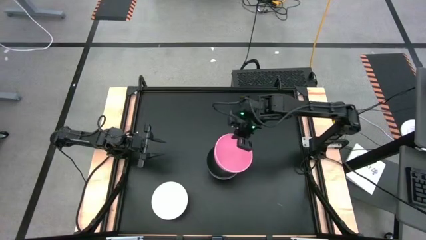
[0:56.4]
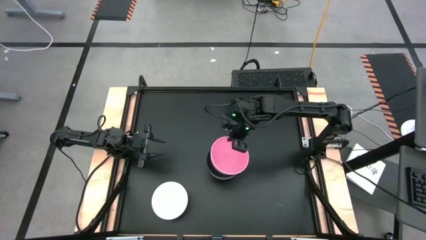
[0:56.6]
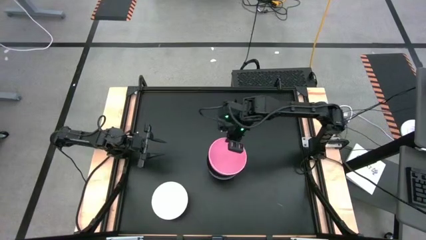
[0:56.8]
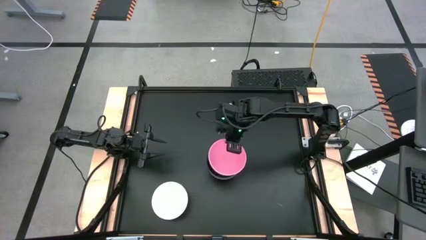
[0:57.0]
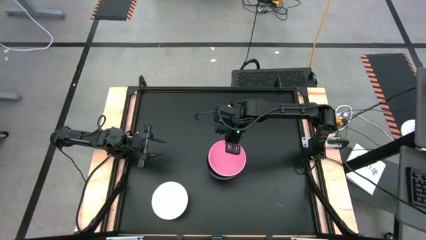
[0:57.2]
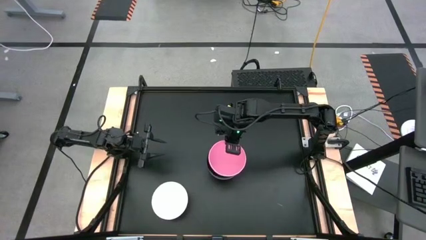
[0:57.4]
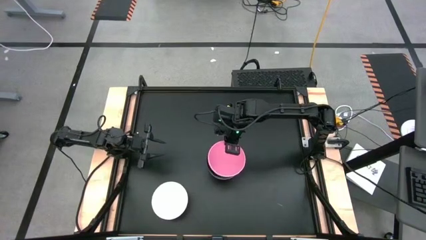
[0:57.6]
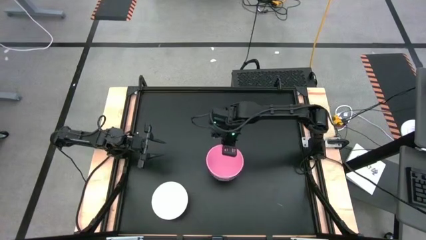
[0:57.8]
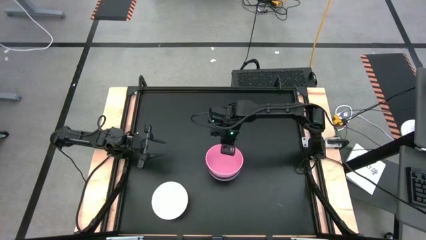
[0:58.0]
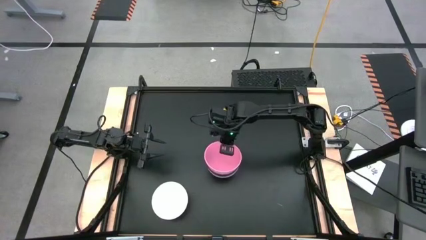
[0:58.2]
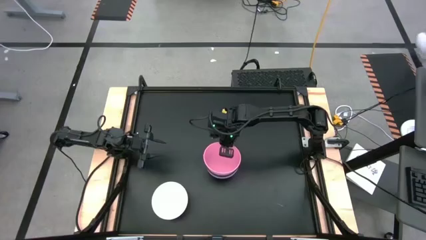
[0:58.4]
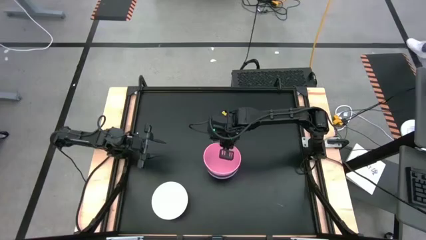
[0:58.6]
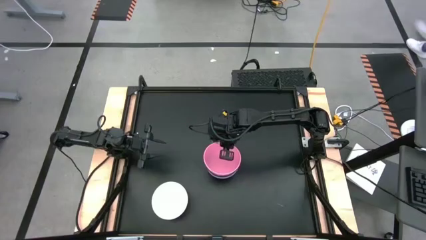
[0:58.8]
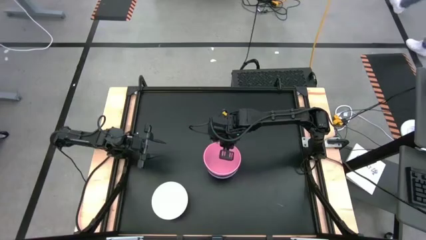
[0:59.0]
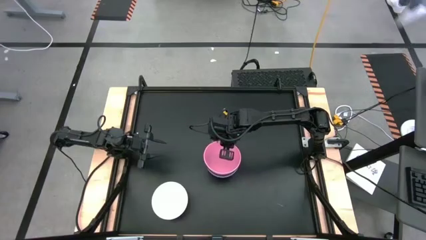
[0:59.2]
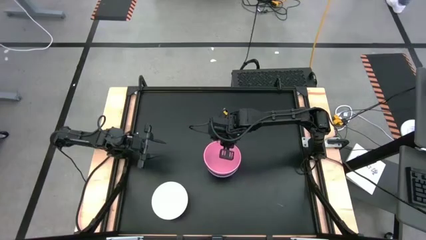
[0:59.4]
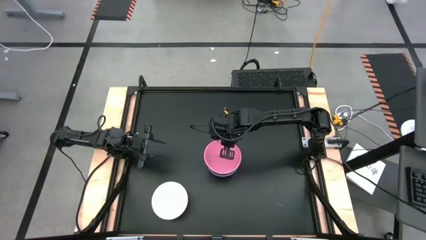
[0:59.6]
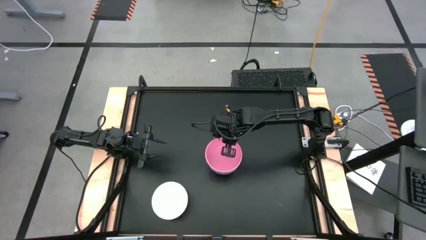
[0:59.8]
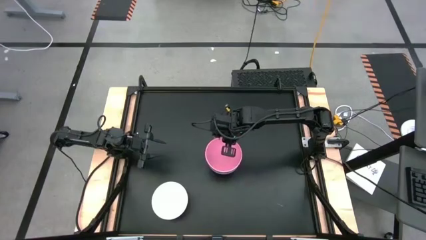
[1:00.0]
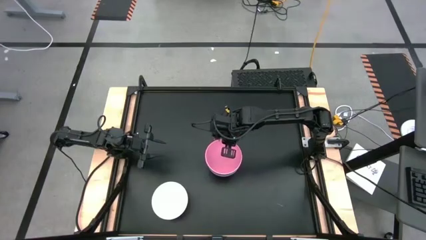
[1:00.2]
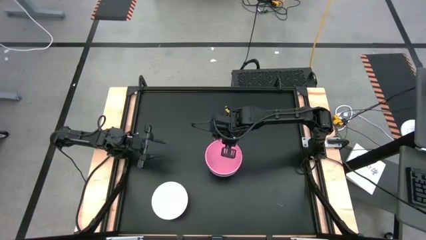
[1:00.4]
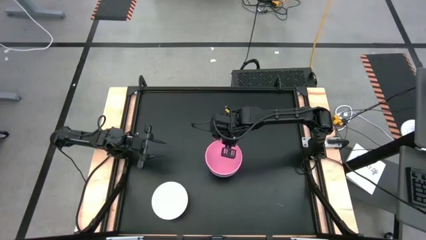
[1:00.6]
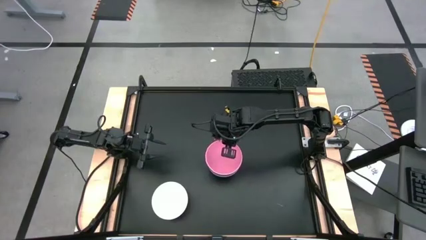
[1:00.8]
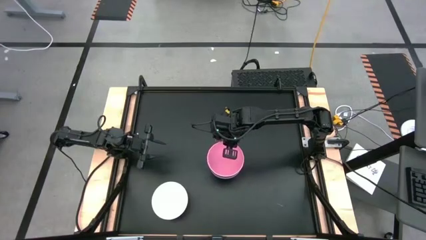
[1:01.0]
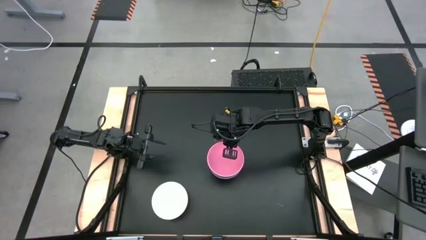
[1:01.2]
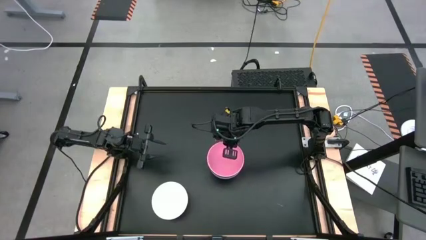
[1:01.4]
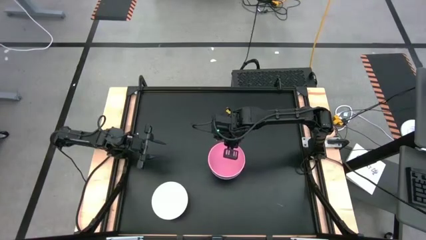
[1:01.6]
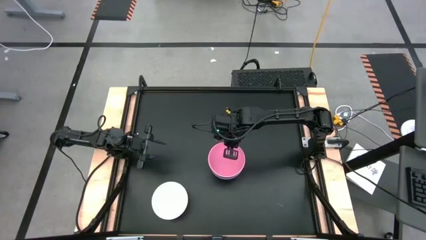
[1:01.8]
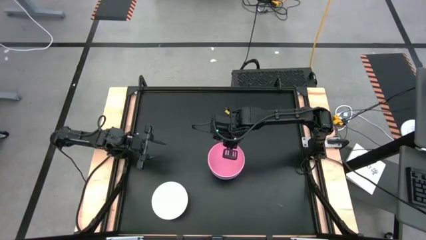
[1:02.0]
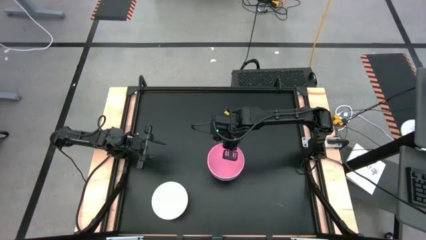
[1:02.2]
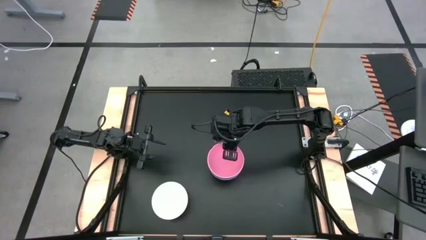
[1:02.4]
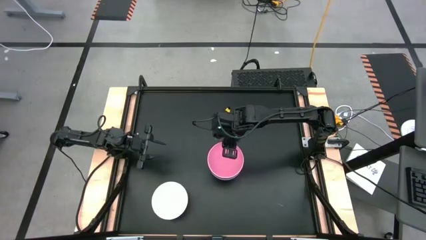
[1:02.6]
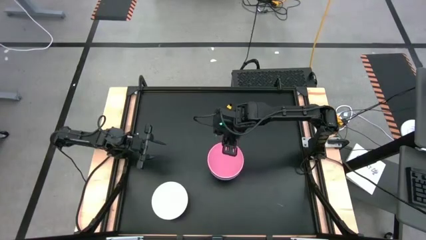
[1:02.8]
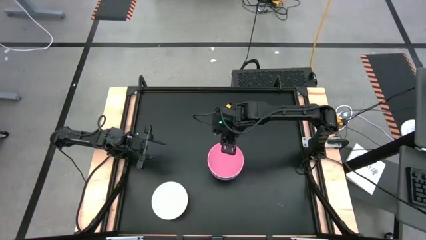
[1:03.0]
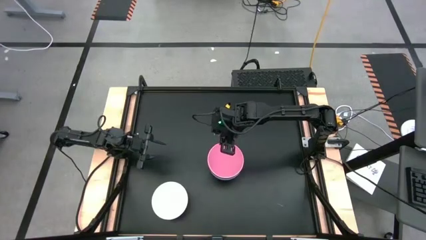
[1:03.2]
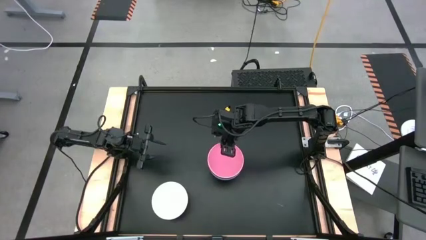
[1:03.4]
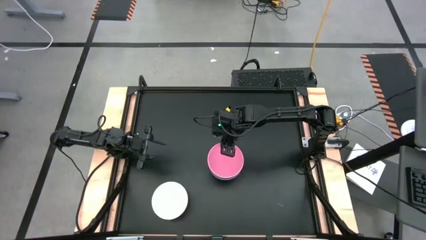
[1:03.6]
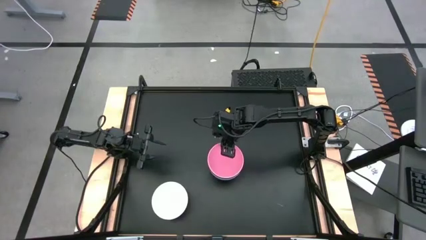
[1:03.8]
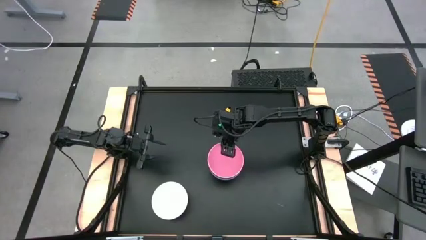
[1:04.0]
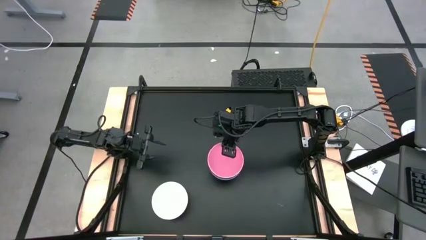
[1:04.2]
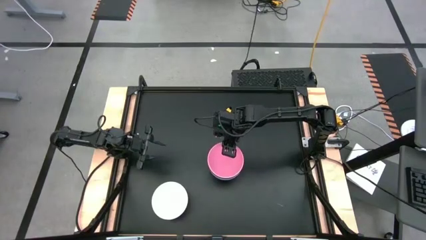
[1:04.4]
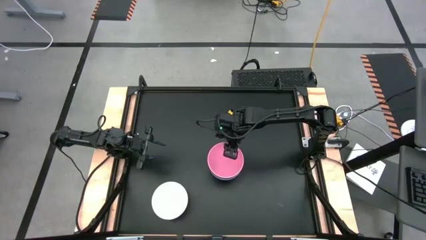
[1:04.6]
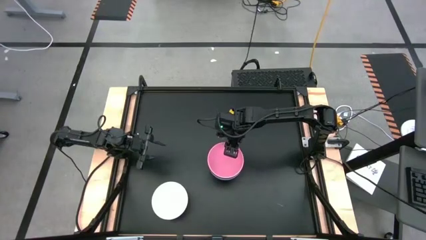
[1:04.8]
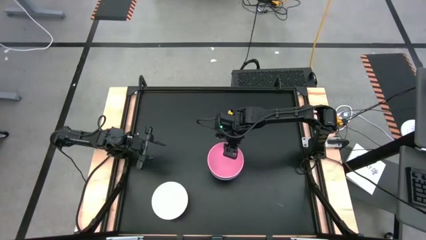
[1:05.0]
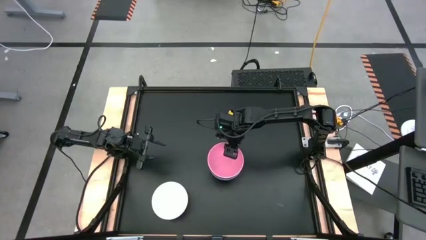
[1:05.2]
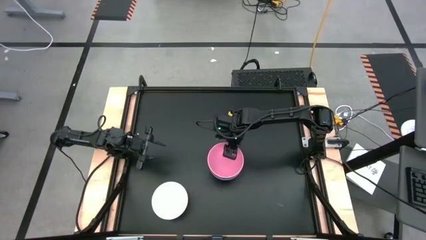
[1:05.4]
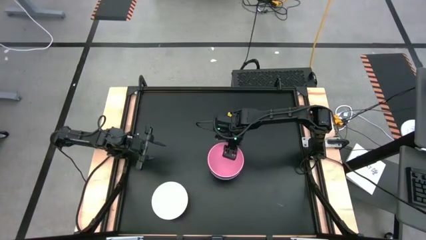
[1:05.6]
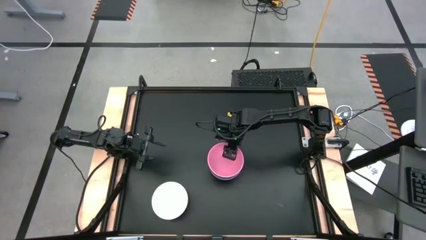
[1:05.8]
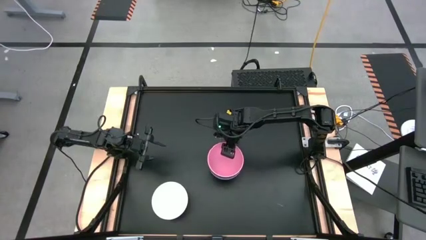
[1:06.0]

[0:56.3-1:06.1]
Task: Nest bowls inside each other
Stack the pink bowl on top of the black bowl

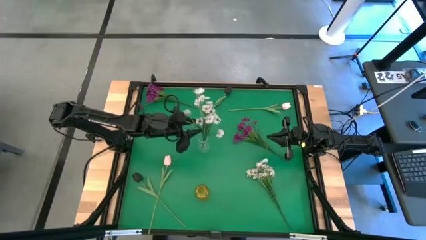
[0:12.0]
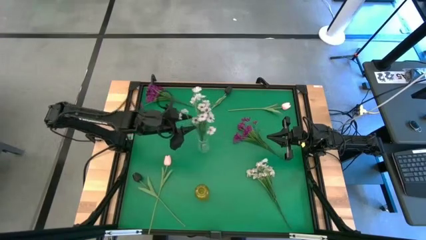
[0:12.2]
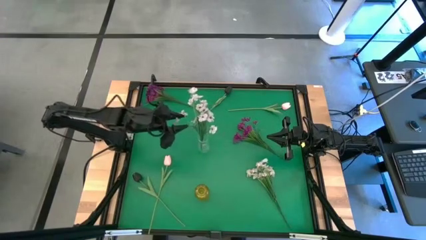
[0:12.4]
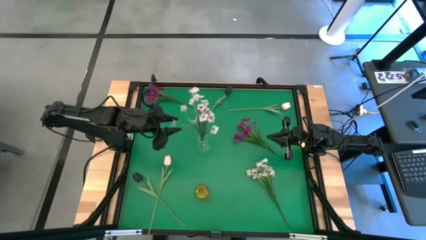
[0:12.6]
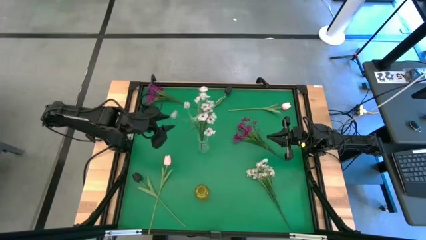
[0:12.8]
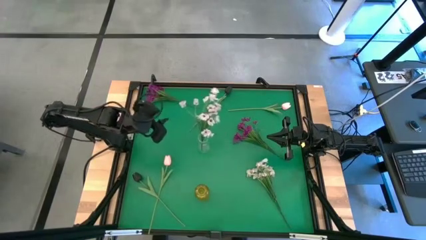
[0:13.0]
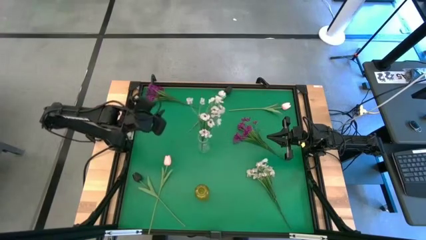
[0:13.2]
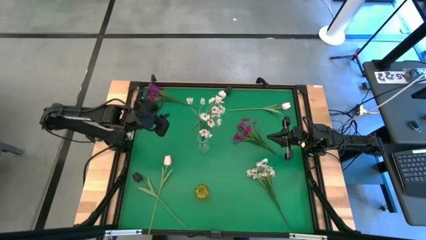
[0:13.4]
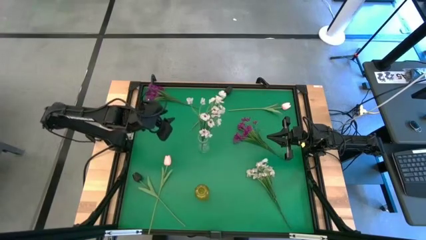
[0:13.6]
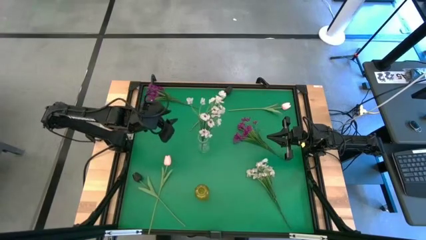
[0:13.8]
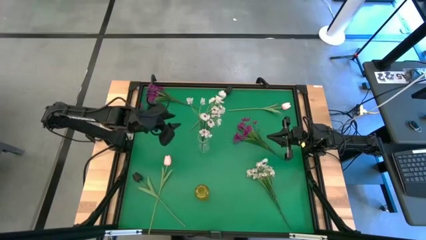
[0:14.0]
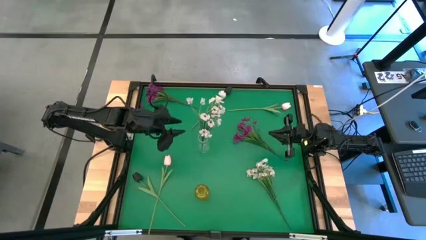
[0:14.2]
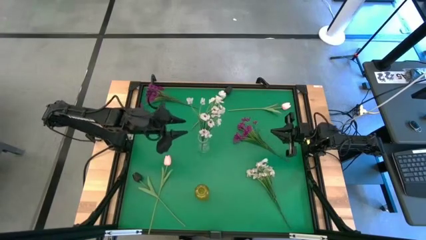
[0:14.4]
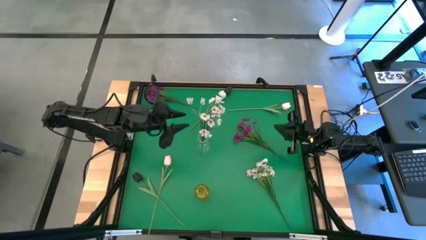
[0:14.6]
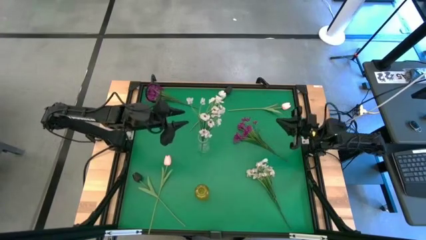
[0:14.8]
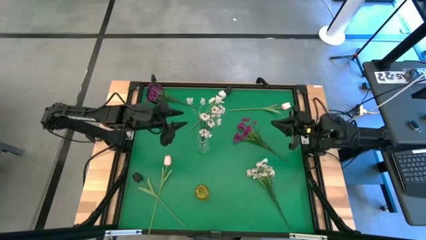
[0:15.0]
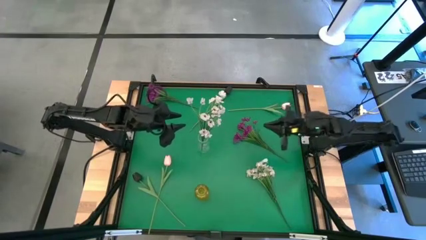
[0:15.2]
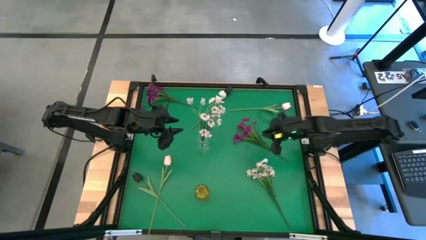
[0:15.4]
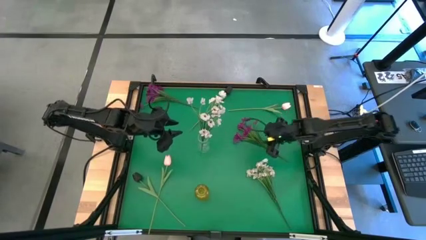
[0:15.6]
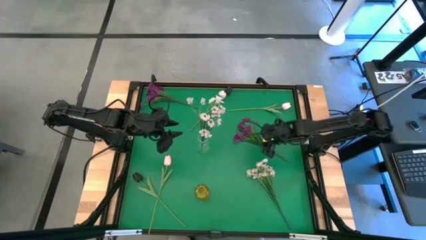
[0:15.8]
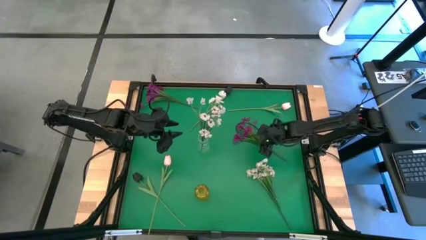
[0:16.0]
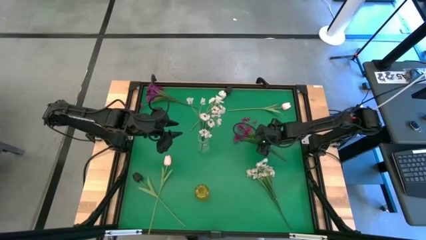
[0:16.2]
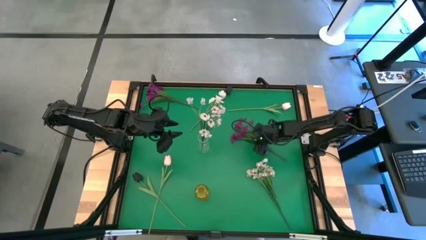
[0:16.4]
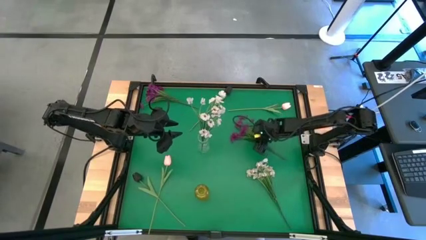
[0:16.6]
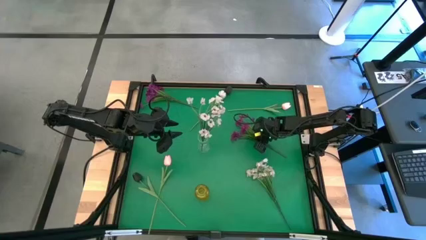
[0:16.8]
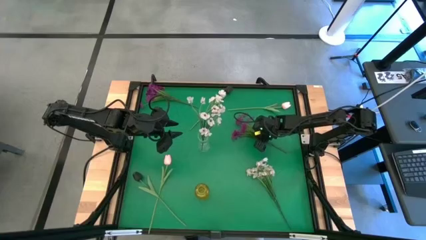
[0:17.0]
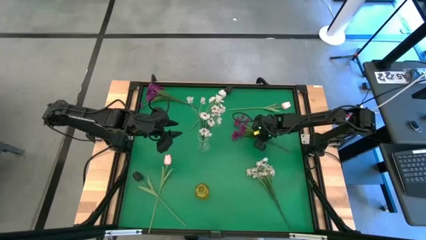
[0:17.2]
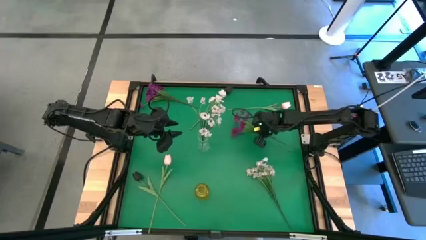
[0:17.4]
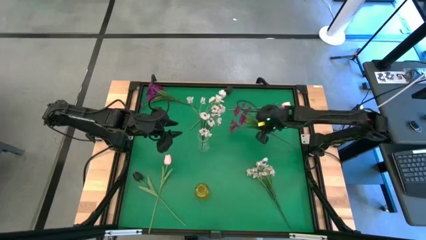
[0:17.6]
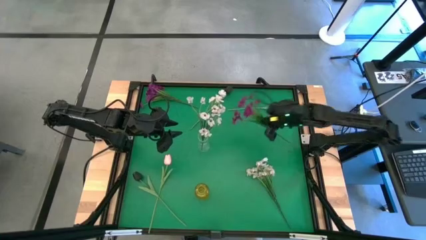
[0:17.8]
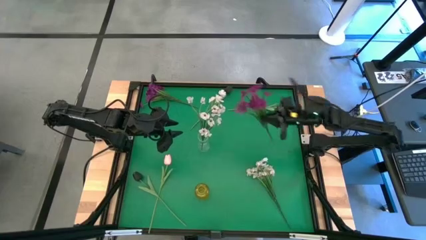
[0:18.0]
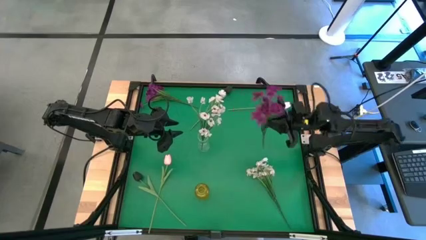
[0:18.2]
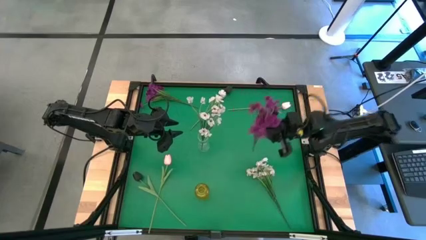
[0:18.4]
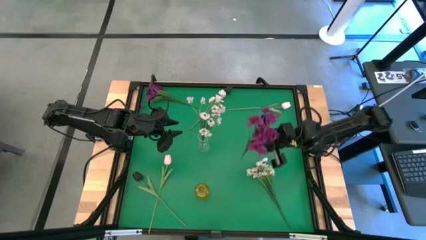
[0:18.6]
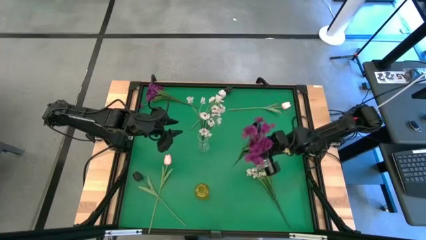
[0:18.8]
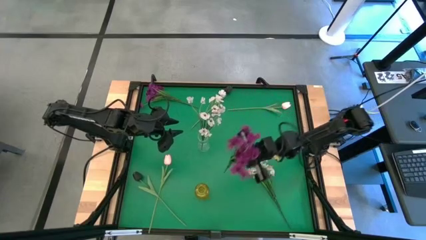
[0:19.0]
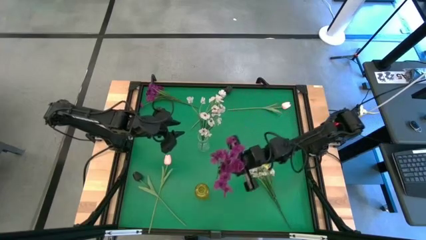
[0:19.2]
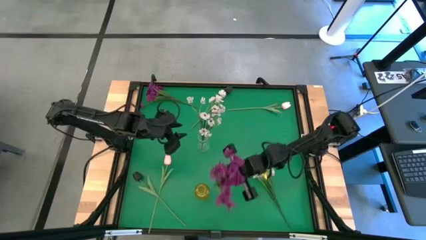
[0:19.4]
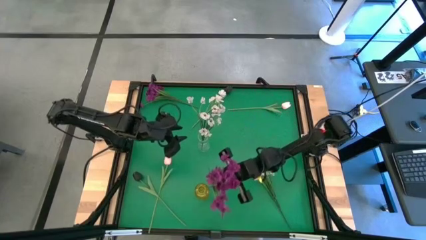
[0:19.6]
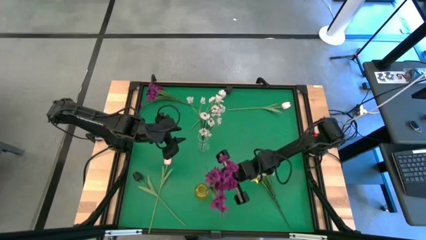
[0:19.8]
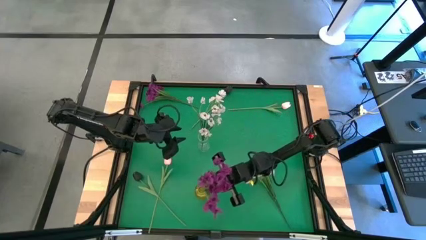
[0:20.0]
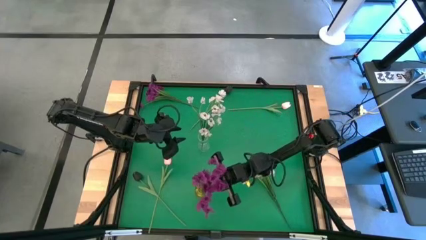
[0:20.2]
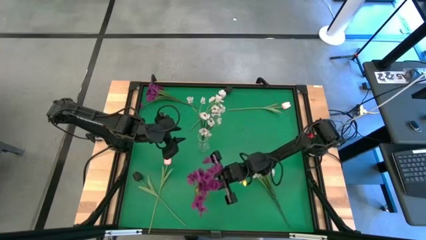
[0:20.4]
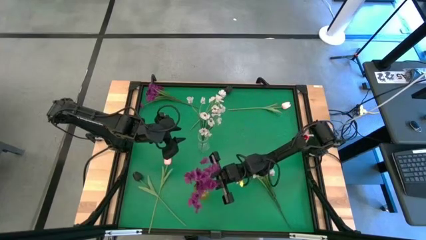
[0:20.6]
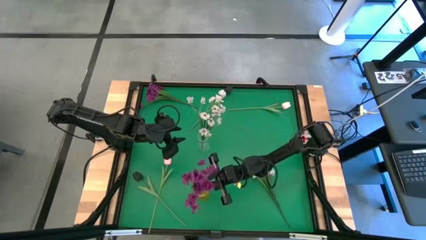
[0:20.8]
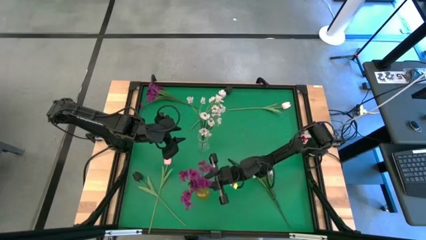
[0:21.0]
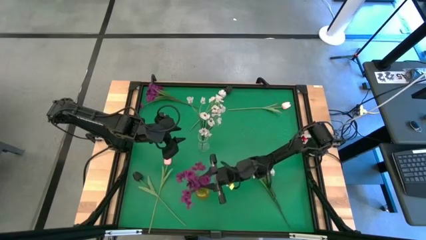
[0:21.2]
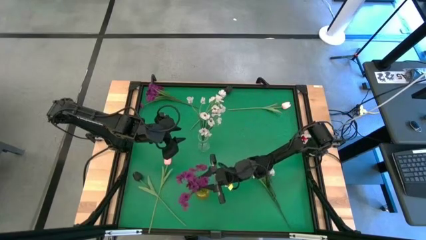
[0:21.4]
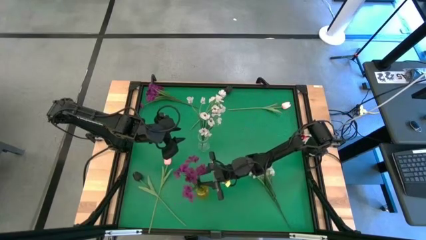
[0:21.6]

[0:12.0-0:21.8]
Task: Sort flowers into vase by color
Put the right purple flower into the yellow vase
